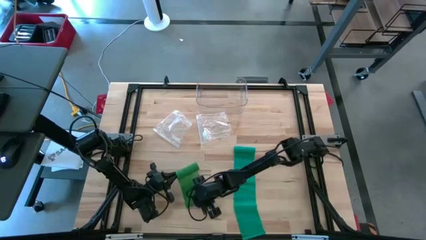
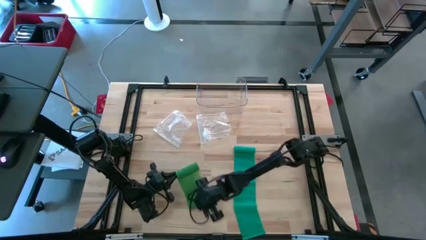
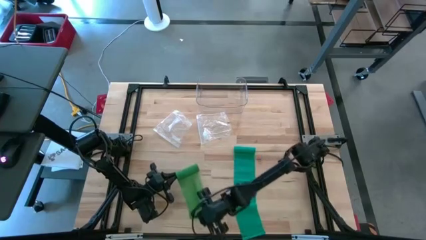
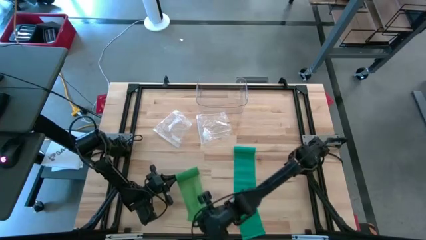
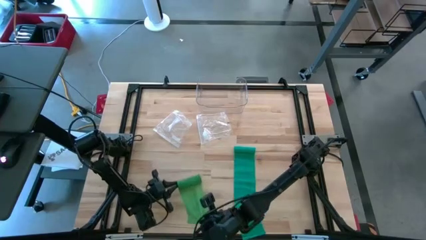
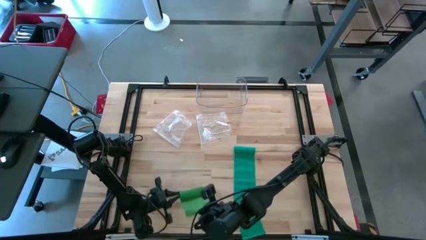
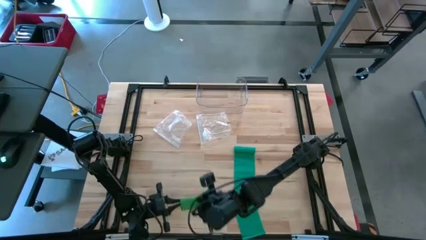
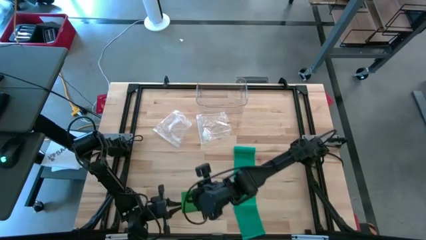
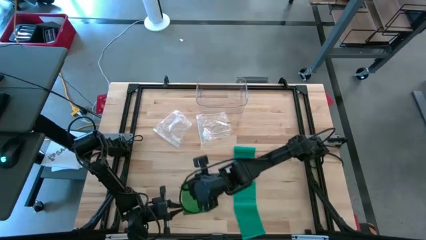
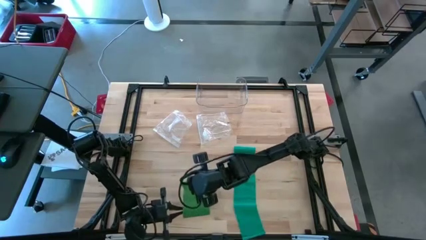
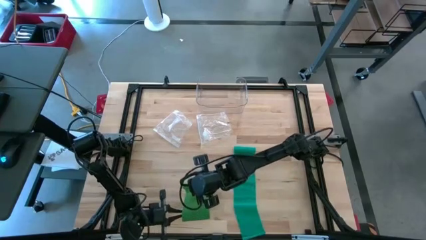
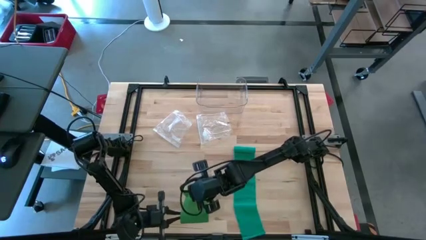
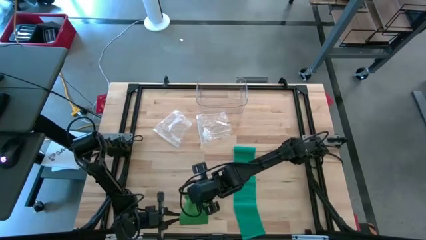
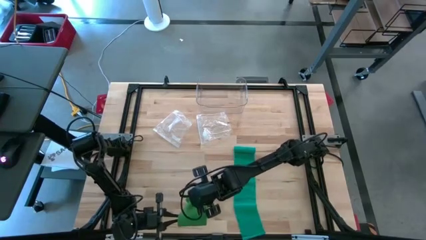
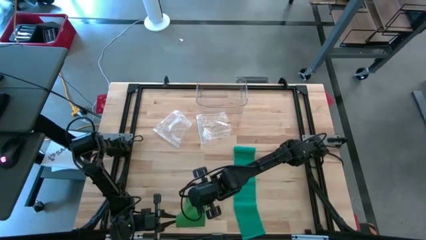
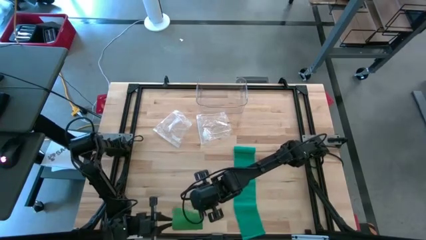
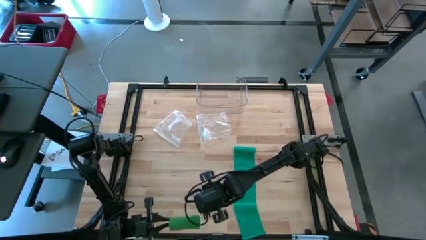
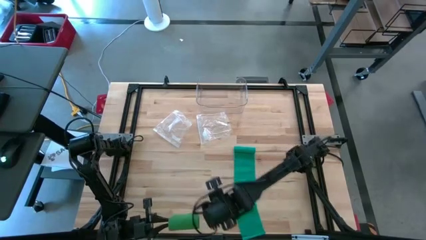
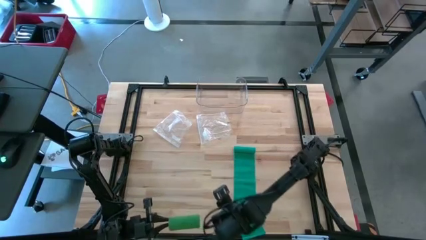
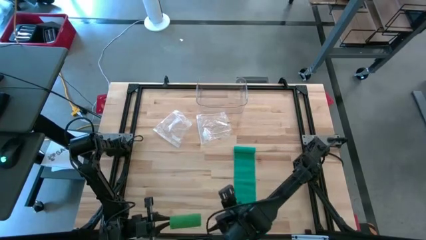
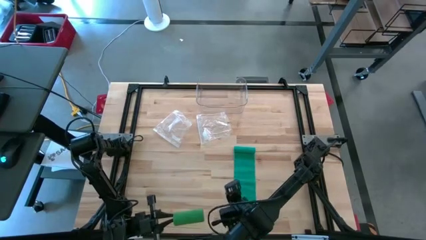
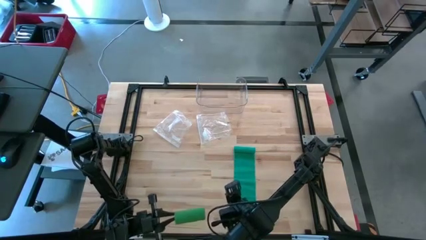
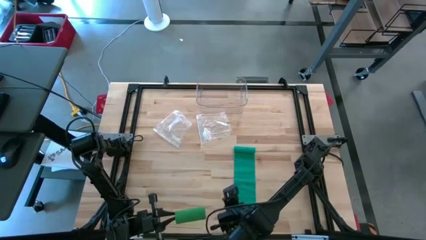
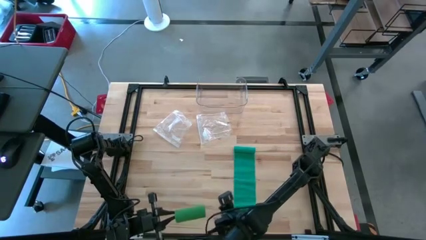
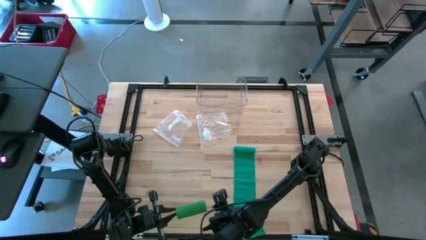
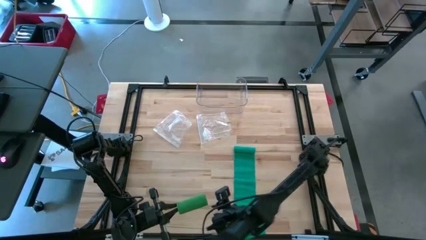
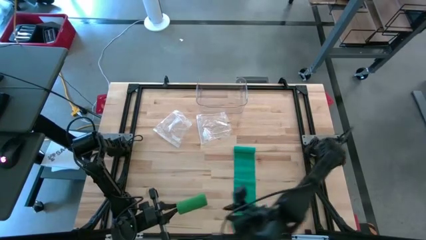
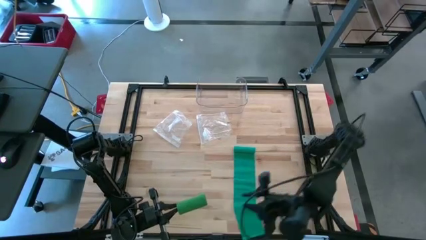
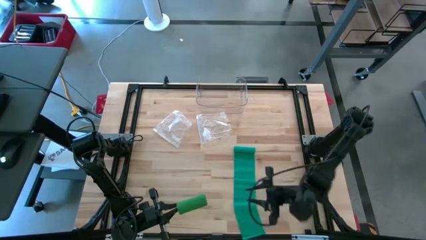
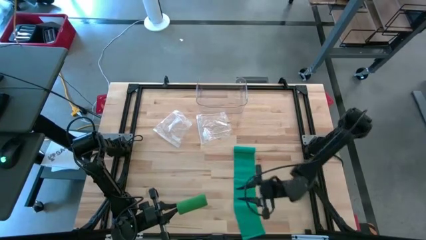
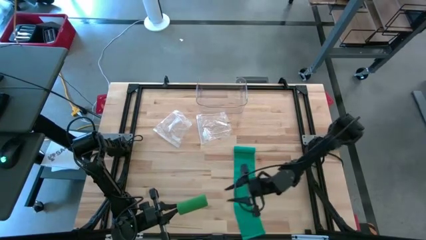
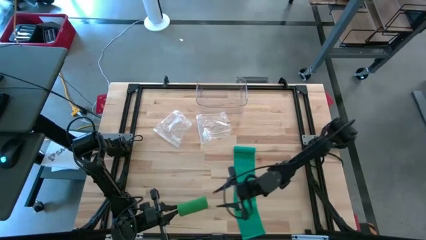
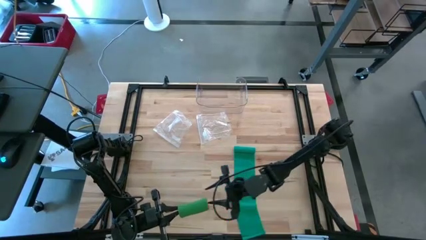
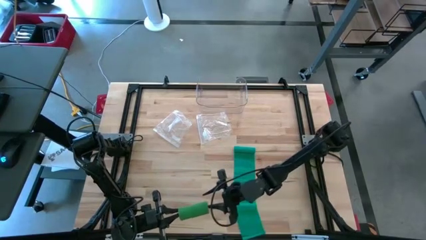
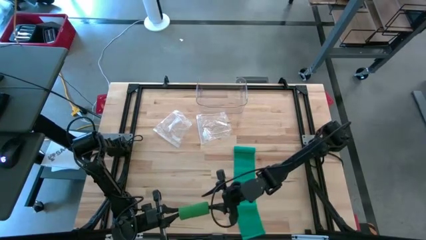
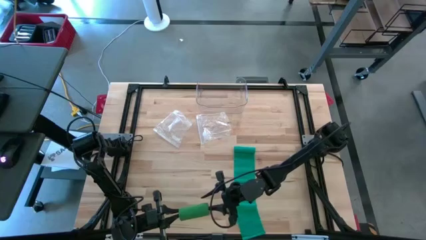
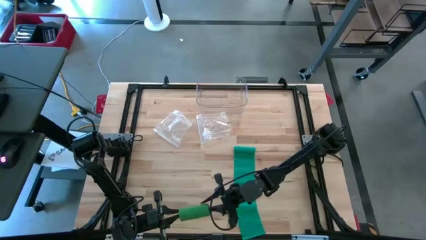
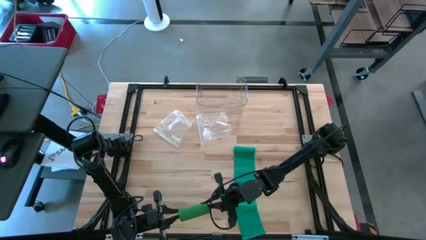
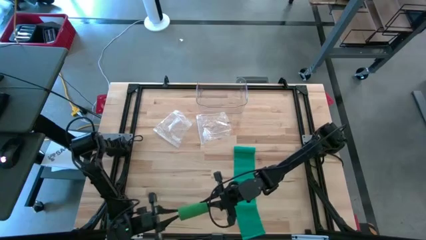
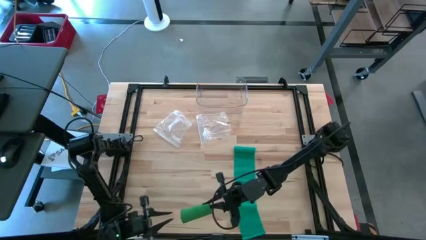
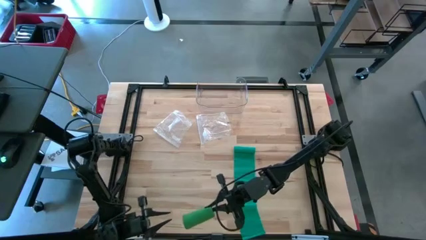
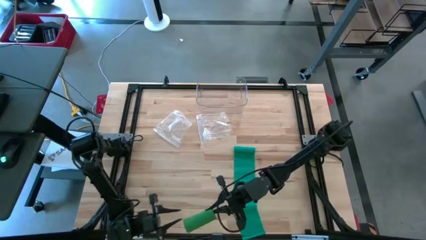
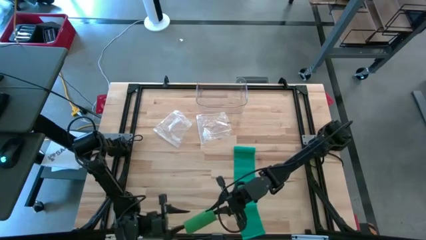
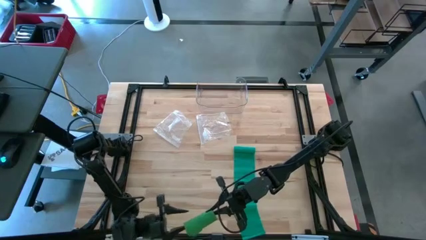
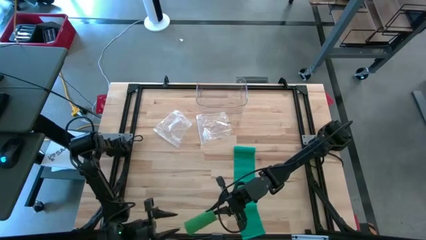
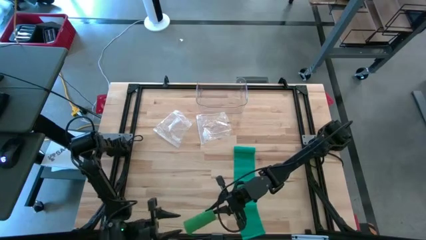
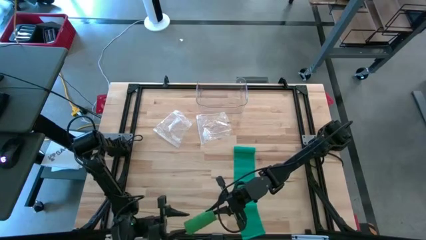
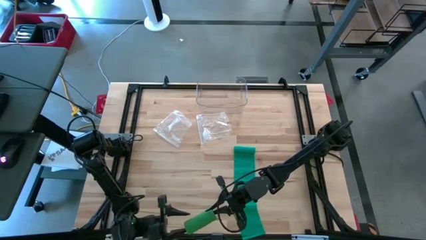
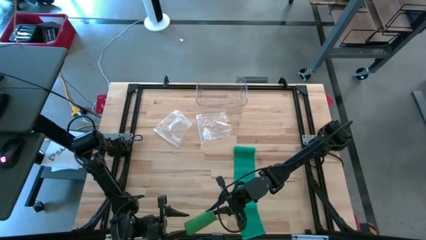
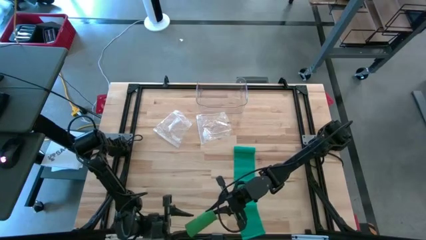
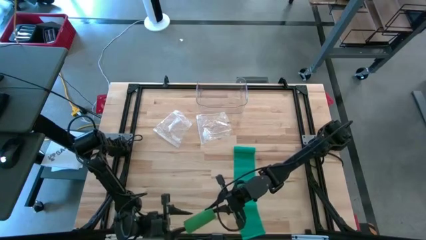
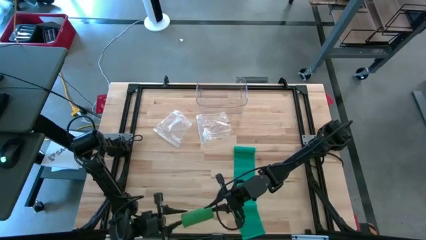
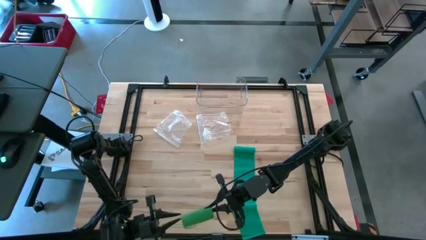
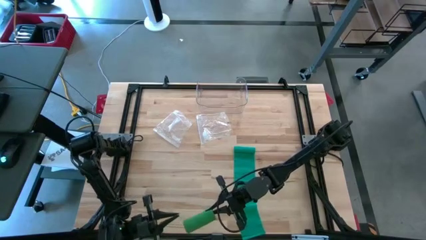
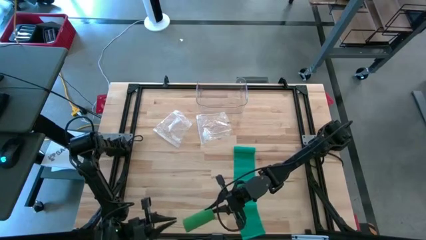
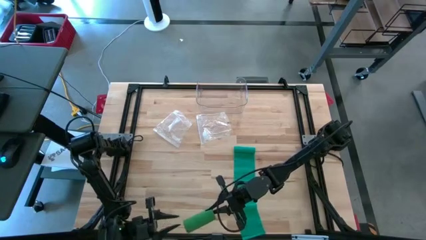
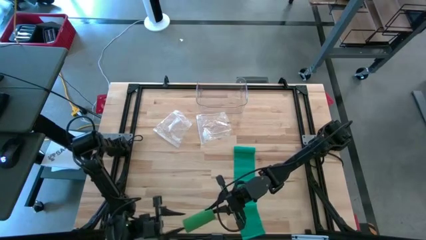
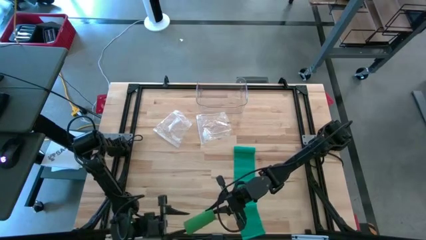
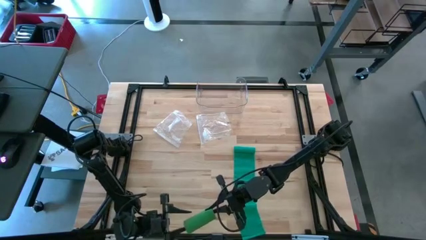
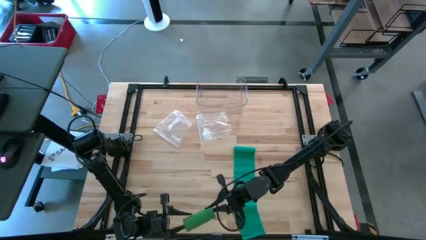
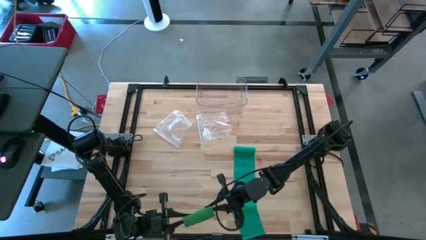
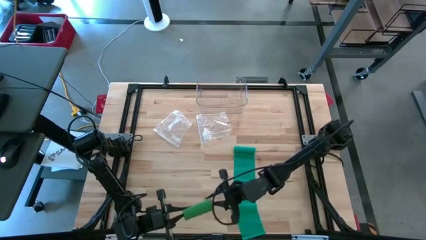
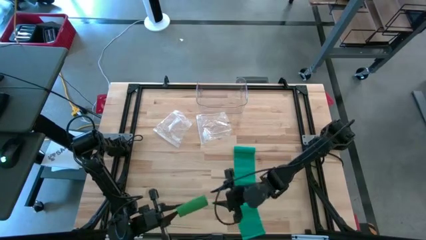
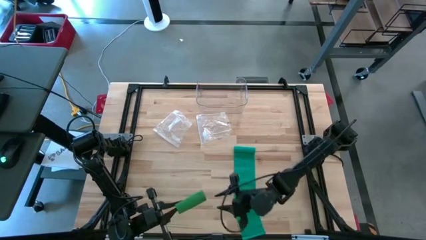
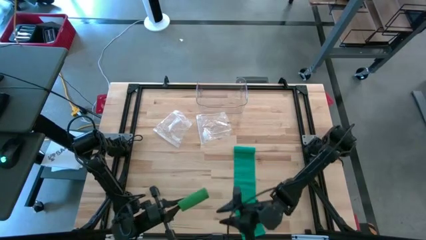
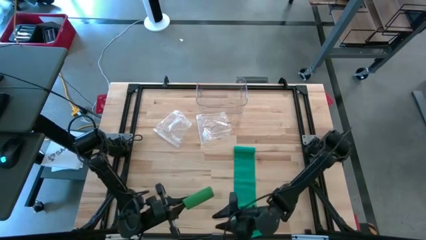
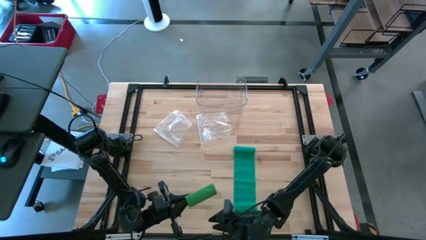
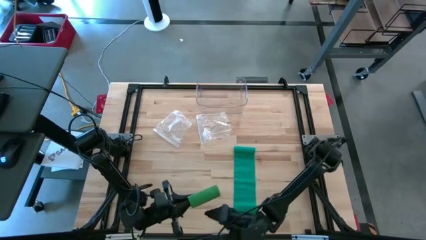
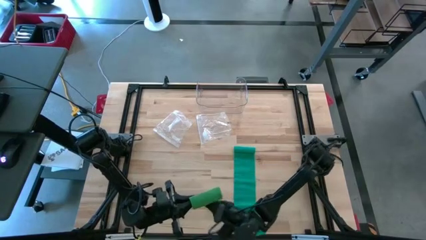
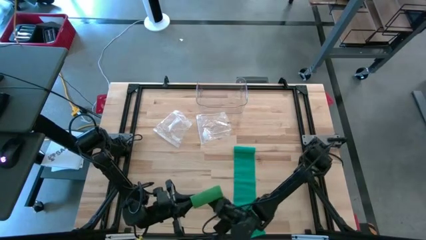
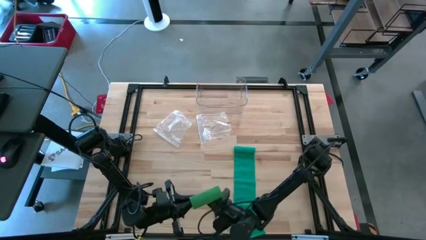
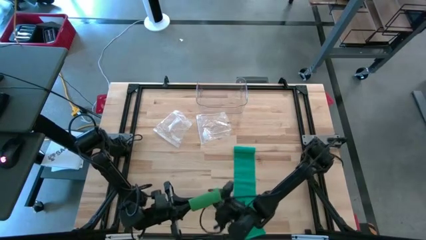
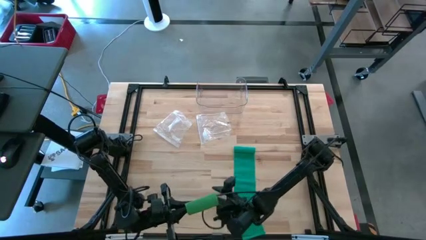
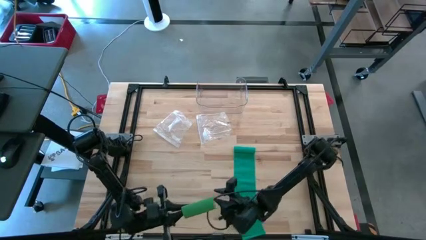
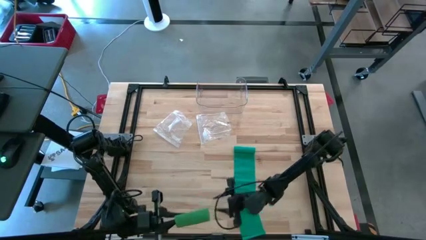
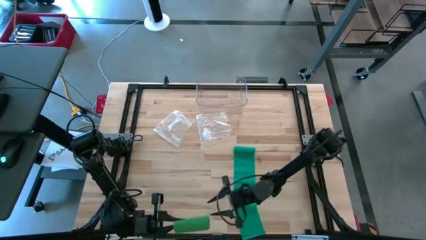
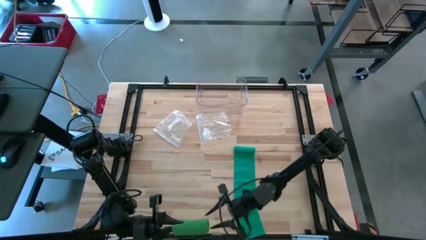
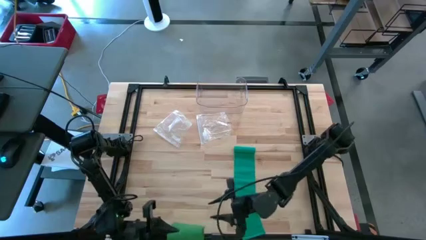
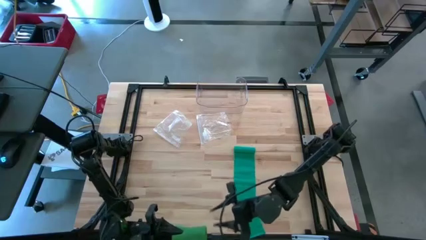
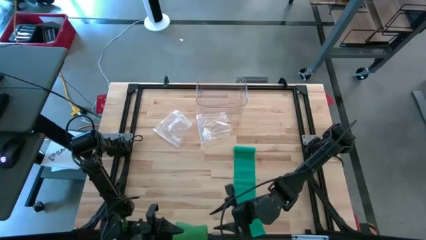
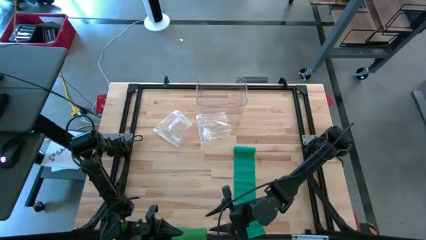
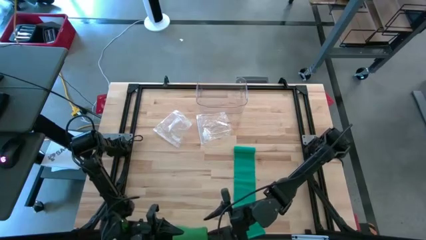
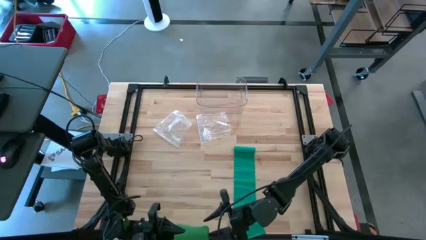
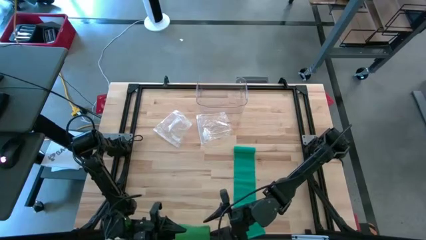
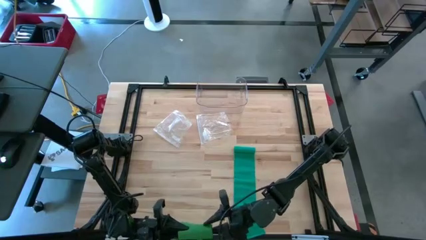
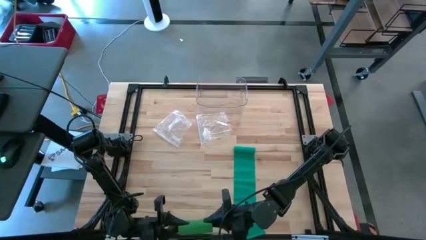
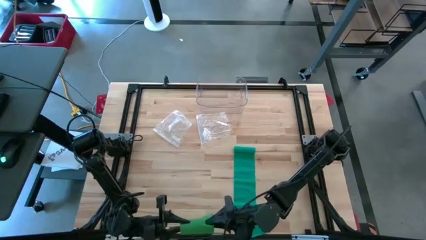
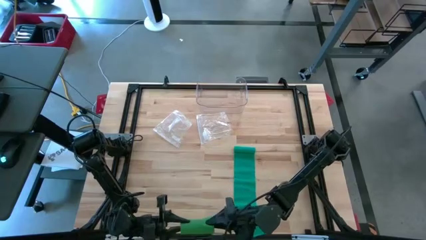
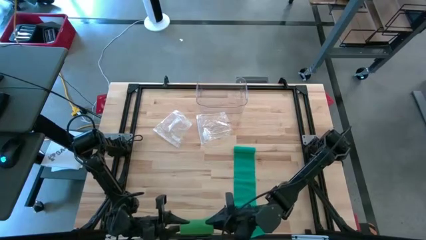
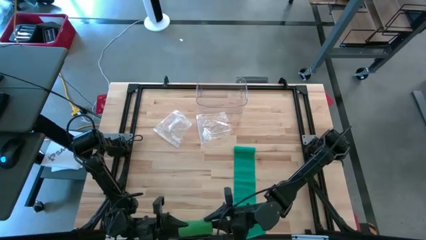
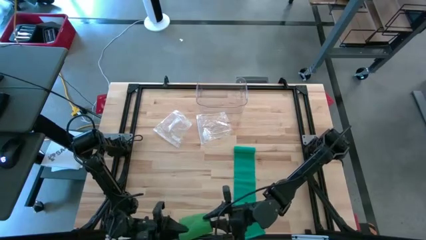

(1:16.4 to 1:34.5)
Task: Roll bandage
Roll the green bandage
